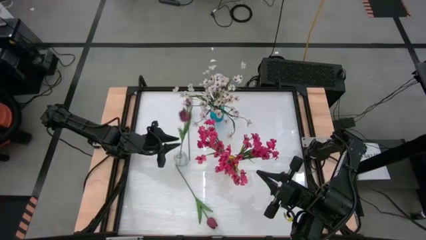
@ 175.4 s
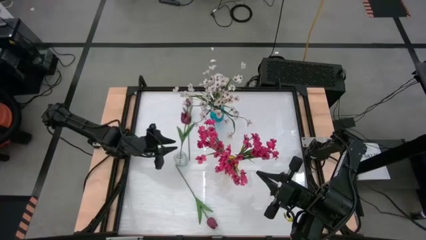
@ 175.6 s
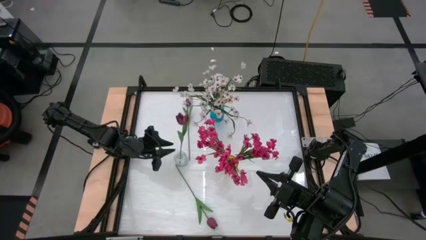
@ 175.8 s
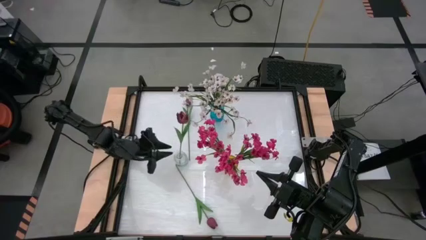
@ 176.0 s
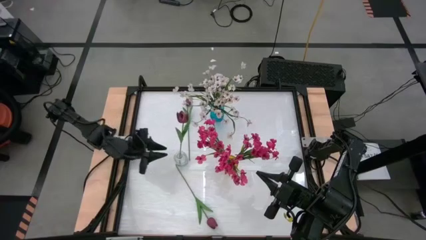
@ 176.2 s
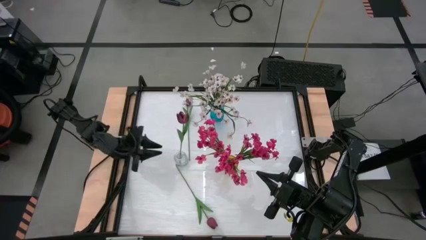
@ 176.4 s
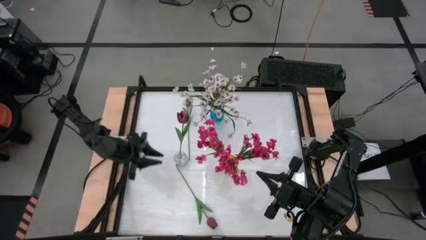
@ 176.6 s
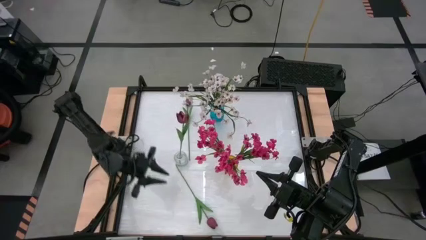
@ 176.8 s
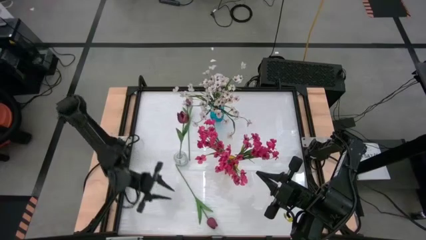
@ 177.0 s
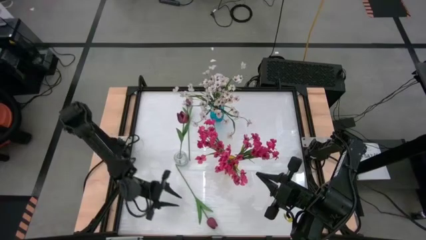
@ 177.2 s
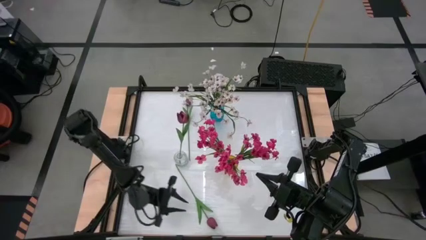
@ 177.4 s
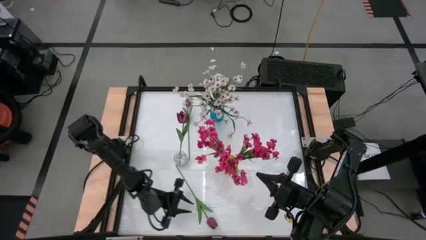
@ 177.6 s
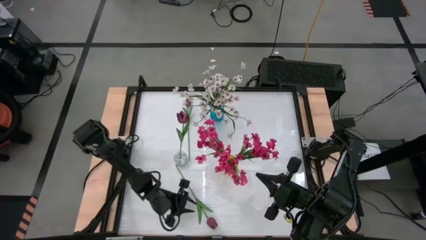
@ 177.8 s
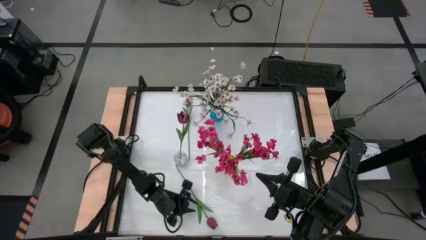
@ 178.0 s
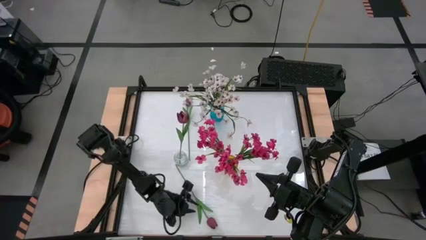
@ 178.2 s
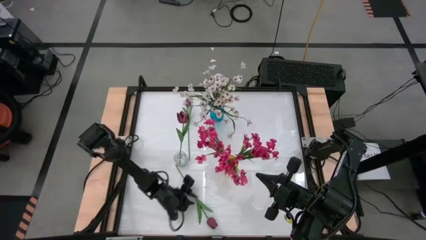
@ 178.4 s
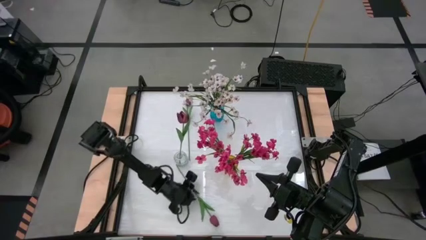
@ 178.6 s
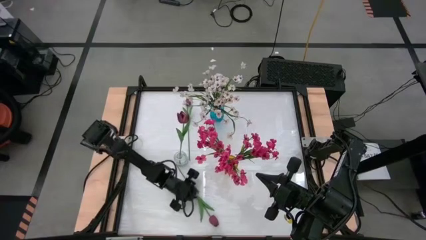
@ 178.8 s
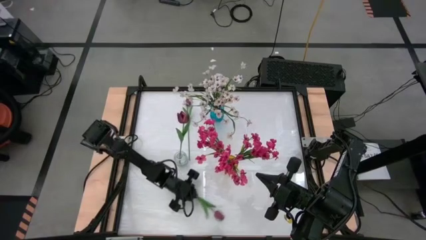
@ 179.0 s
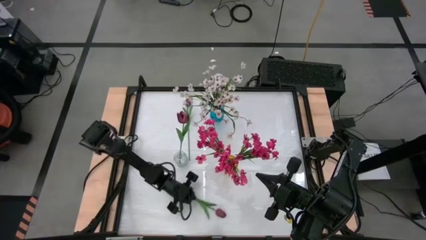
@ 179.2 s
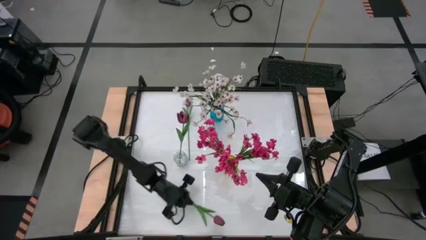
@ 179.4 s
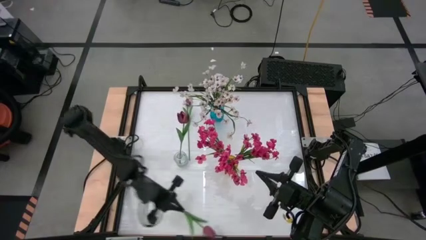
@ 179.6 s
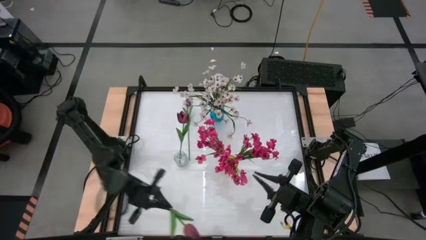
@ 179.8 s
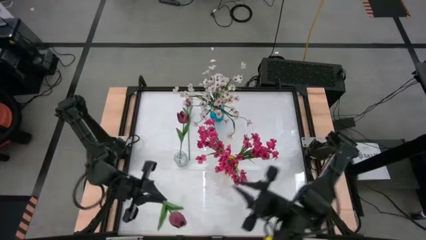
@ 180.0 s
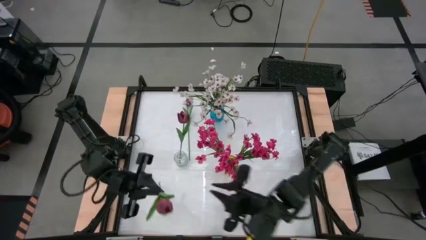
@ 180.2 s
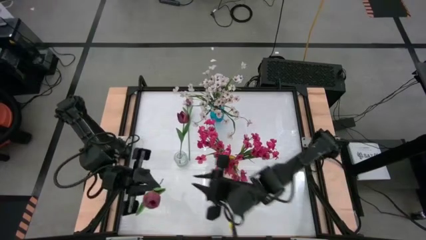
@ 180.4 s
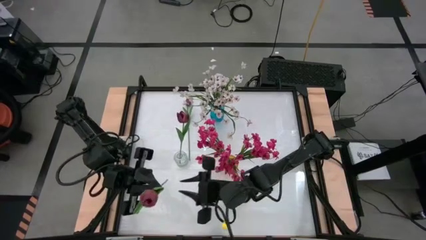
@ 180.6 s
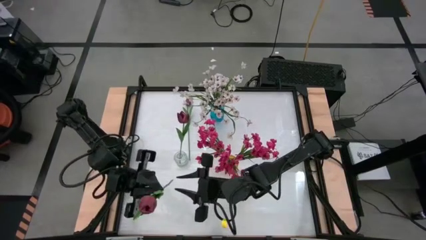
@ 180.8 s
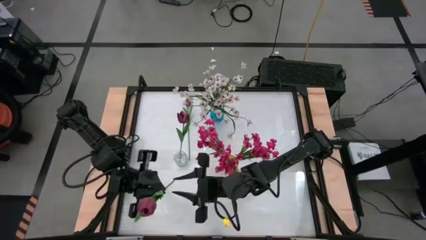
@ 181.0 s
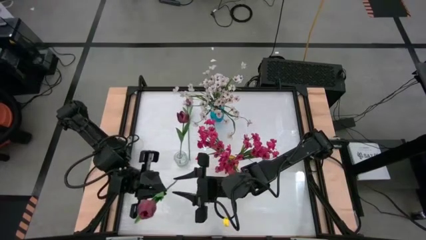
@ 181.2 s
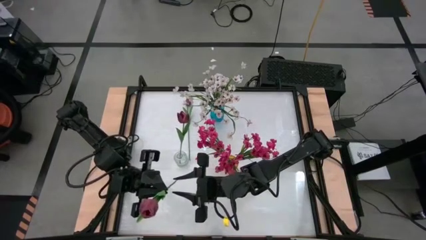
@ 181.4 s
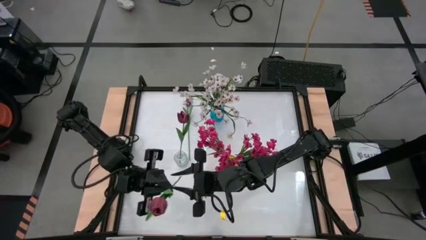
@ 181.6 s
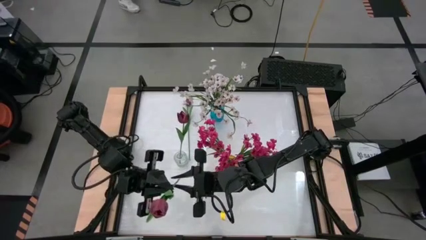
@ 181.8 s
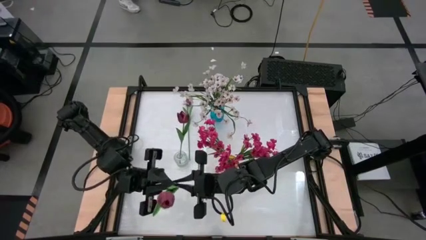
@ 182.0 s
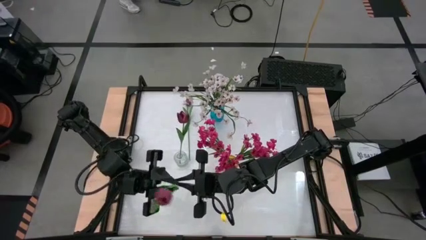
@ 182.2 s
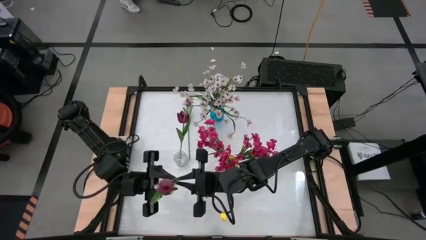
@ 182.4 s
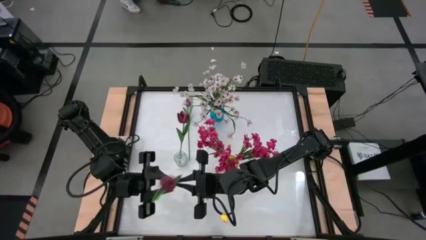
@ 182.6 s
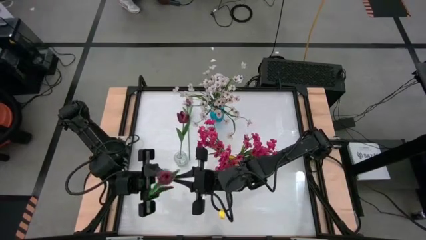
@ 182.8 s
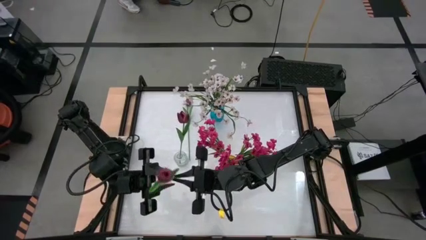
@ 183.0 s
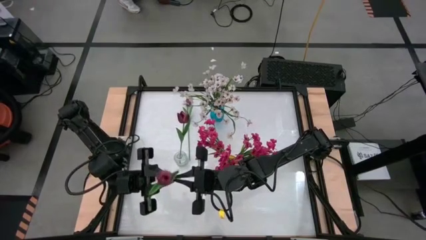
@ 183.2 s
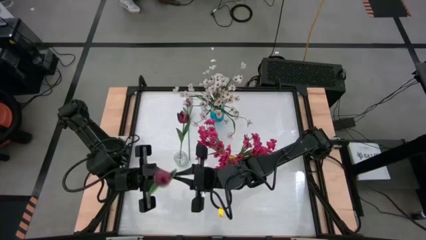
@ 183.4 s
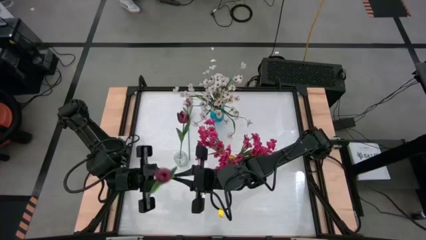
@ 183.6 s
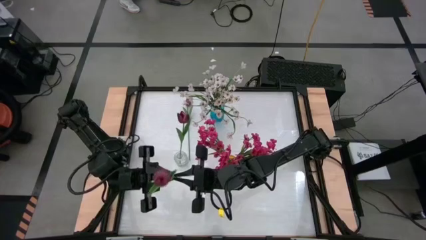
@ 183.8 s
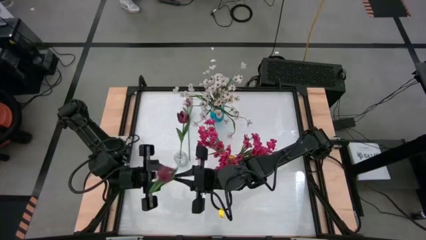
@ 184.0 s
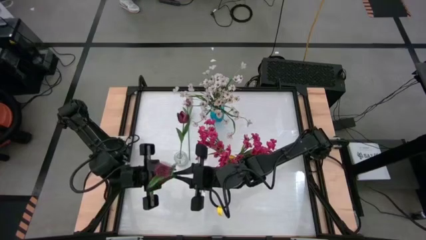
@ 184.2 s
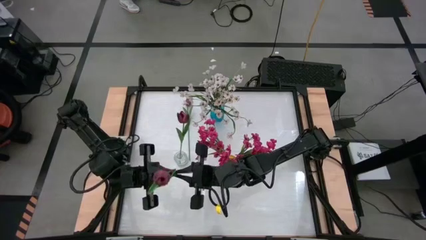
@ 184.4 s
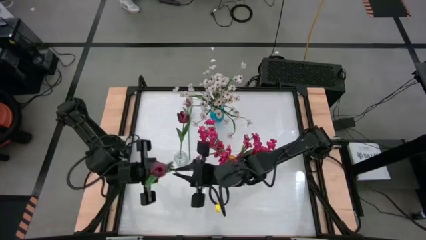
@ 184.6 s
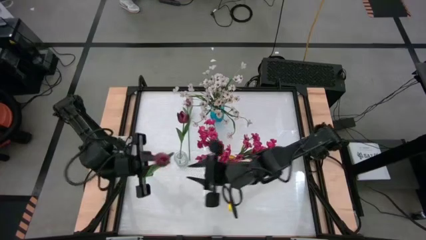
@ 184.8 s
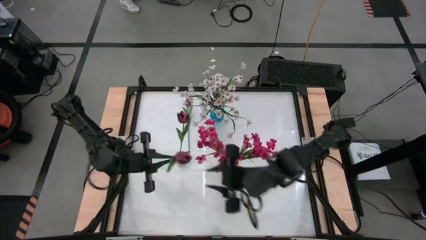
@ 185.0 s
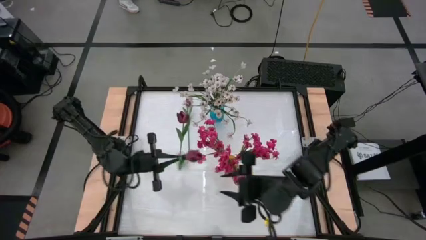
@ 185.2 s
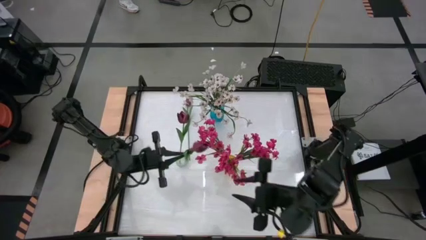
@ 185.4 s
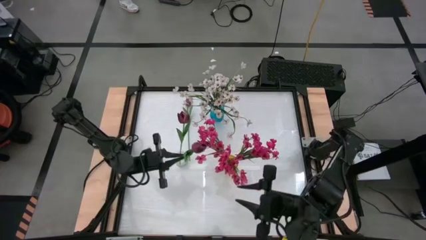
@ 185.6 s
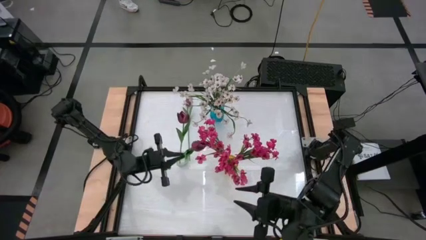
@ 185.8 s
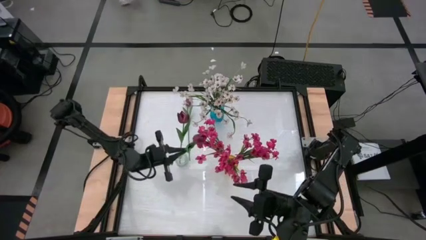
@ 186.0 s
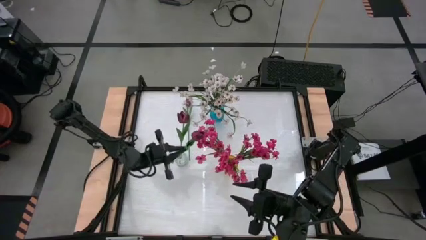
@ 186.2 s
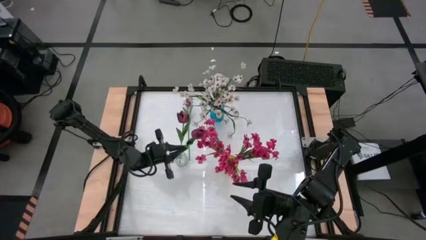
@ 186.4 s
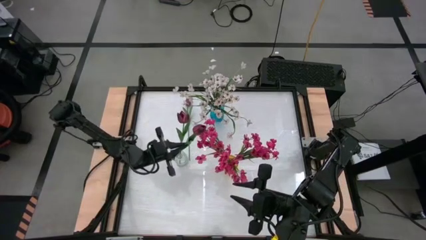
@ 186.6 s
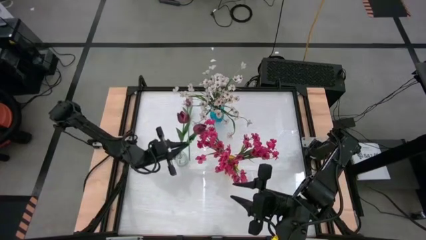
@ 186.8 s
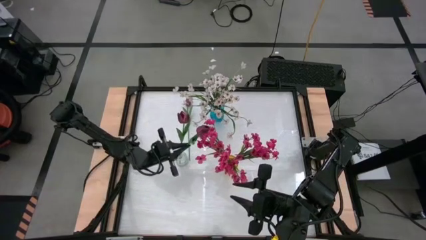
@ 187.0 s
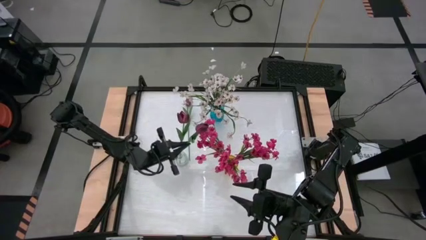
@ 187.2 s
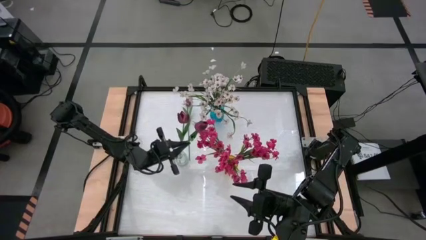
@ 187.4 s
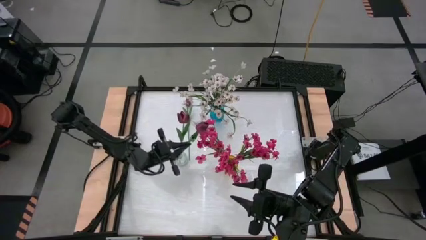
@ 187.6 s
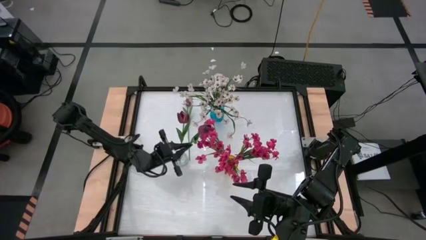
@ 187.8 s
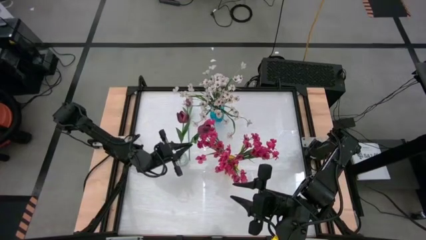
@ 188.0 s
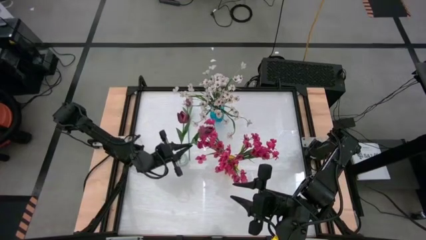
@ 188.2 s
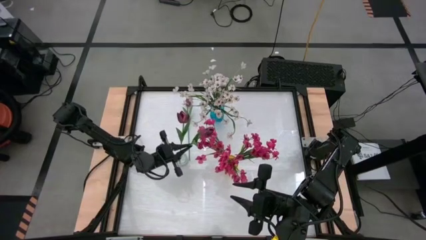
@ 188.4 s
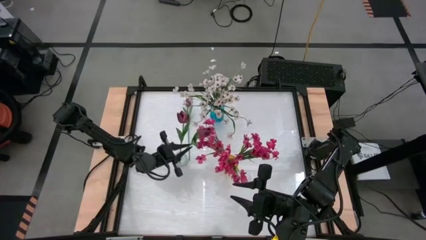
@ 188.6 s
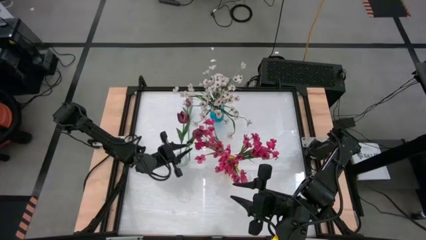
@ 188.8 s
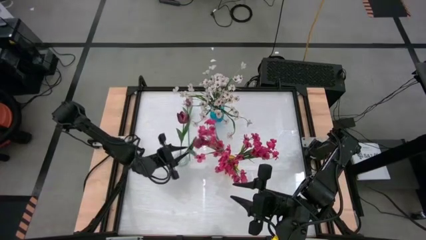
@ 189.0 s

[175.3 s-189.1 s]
Task: Sort flowers into vase by color
Put the bottom red flower into the transparent vase
